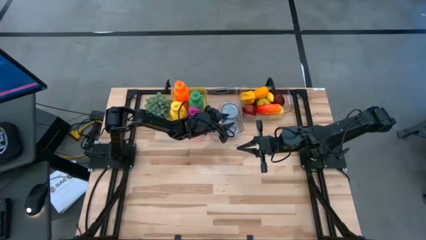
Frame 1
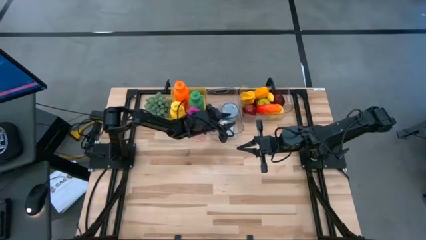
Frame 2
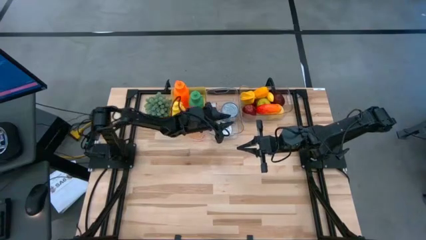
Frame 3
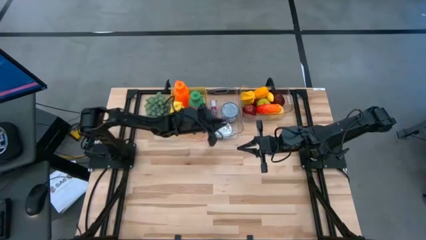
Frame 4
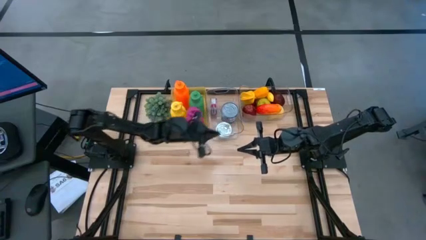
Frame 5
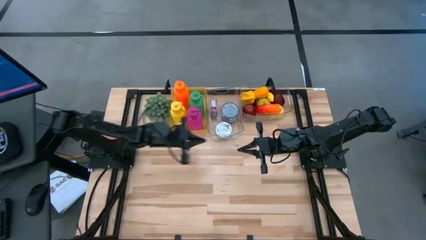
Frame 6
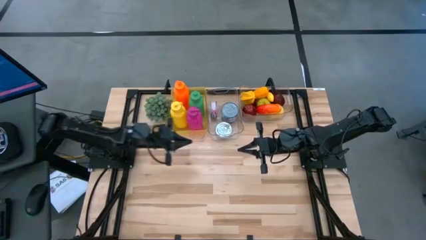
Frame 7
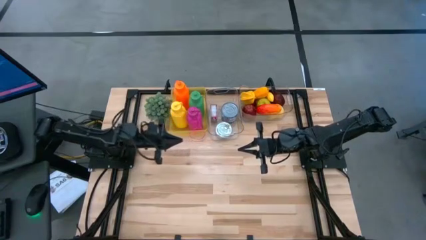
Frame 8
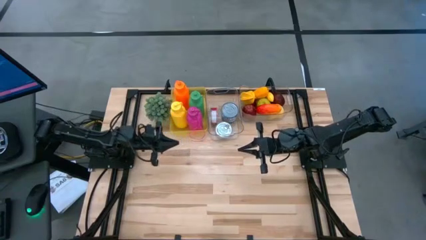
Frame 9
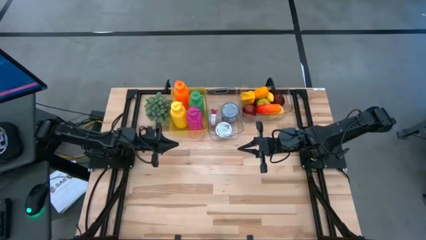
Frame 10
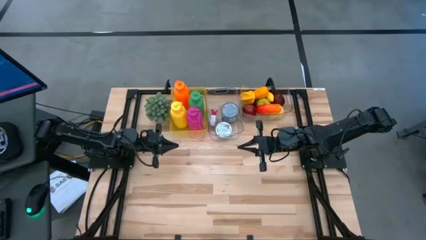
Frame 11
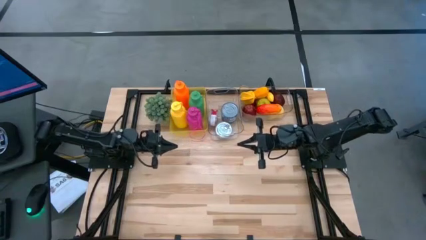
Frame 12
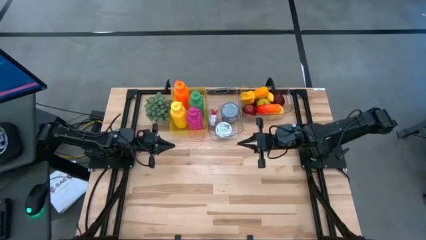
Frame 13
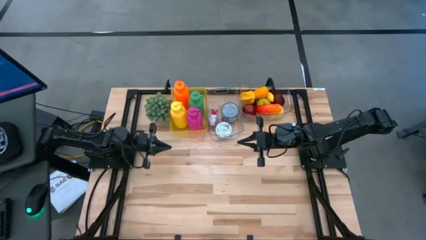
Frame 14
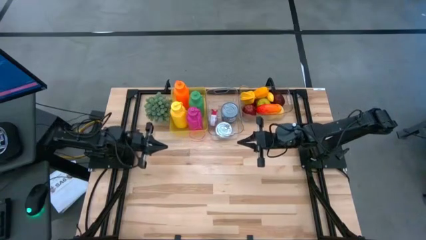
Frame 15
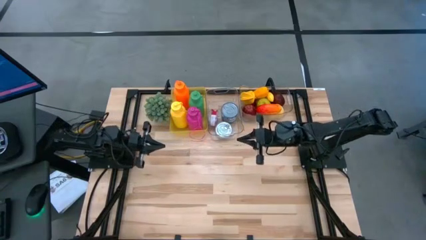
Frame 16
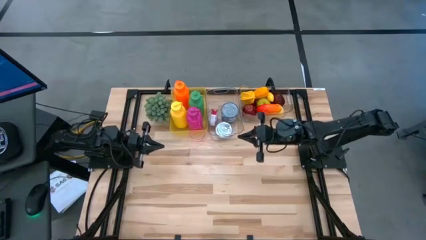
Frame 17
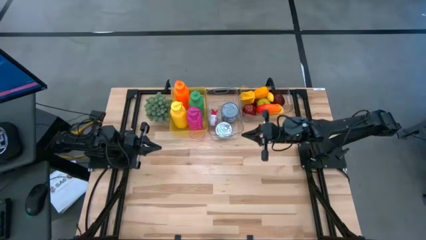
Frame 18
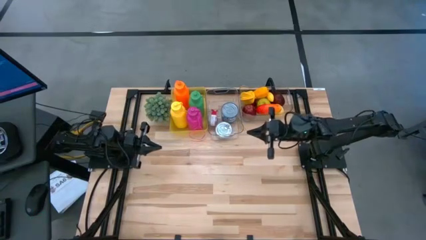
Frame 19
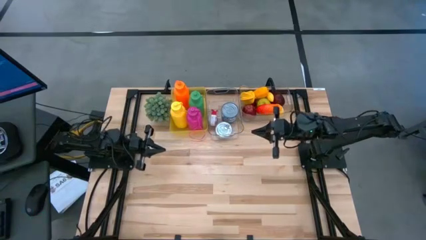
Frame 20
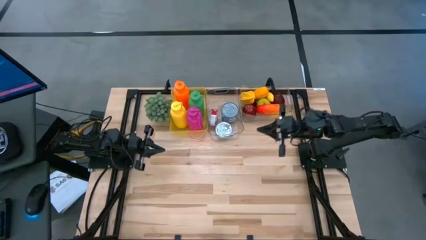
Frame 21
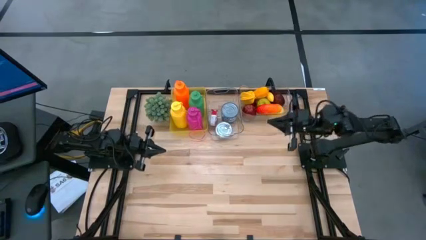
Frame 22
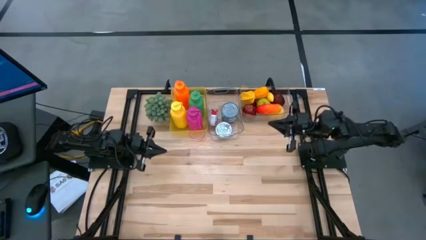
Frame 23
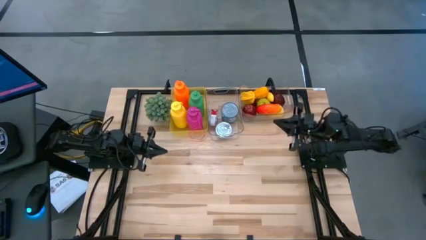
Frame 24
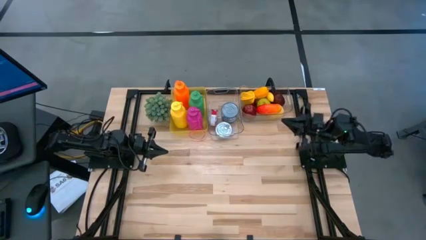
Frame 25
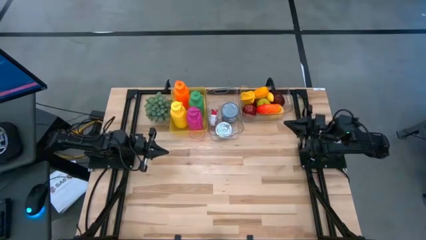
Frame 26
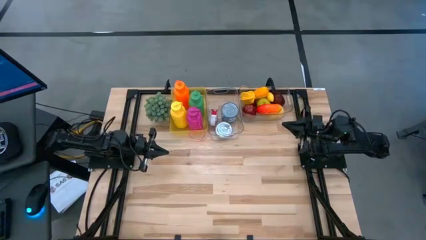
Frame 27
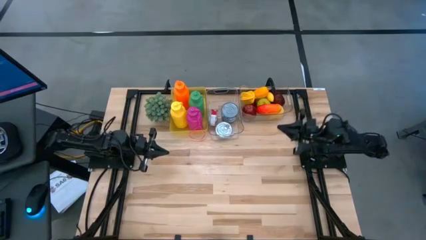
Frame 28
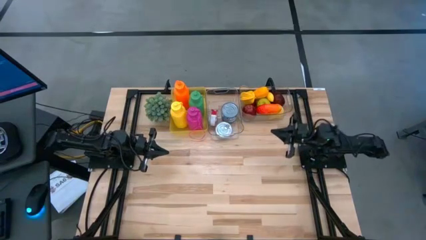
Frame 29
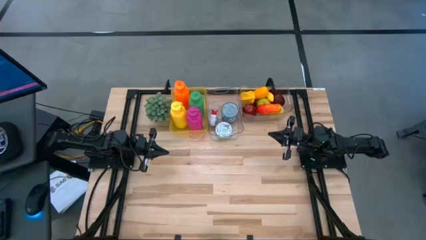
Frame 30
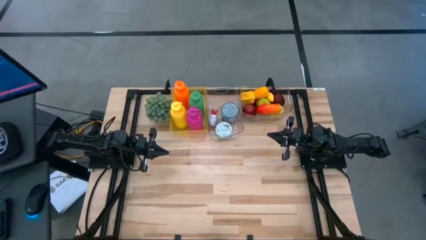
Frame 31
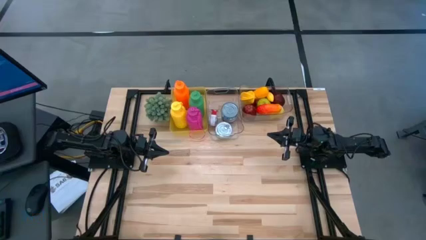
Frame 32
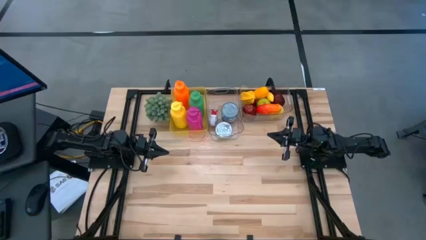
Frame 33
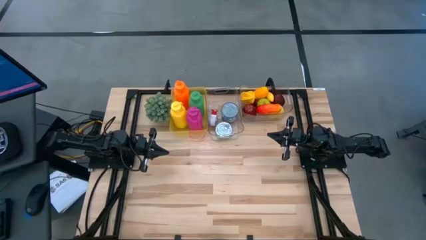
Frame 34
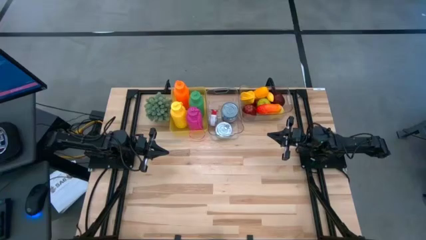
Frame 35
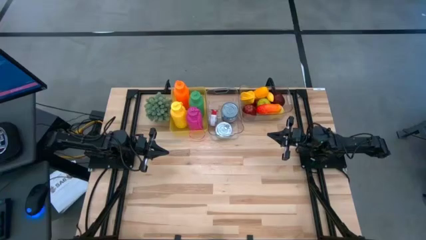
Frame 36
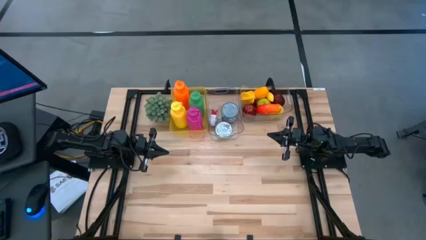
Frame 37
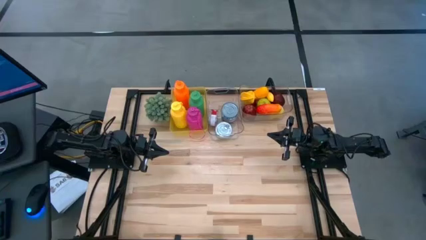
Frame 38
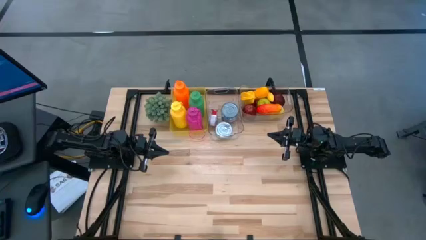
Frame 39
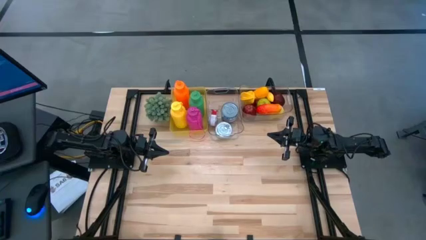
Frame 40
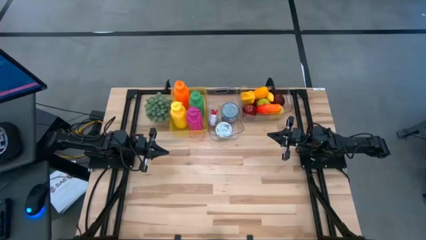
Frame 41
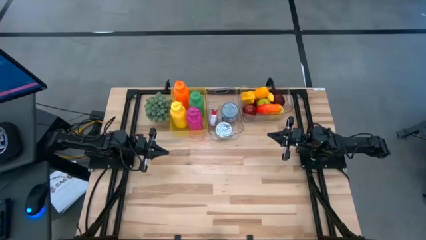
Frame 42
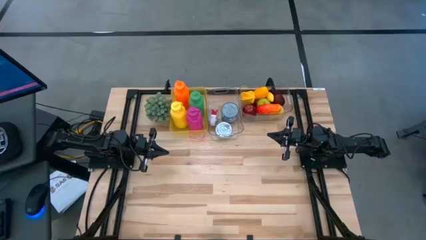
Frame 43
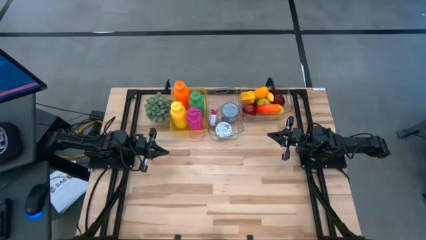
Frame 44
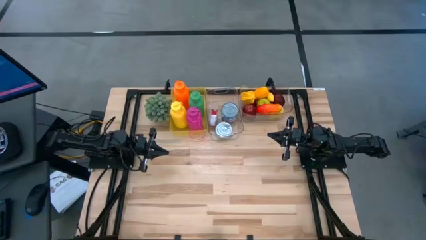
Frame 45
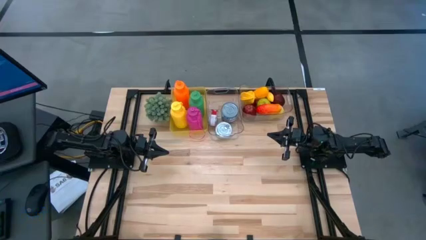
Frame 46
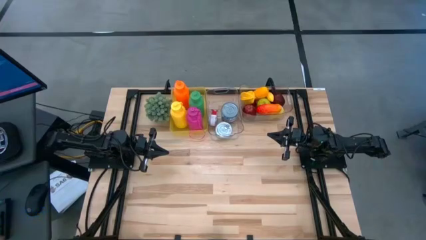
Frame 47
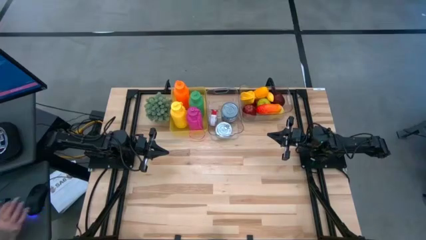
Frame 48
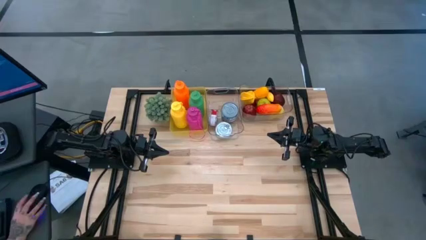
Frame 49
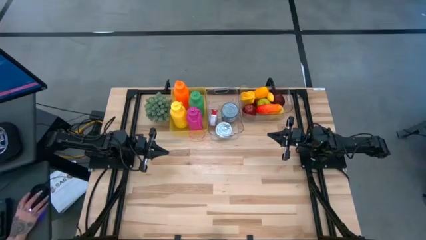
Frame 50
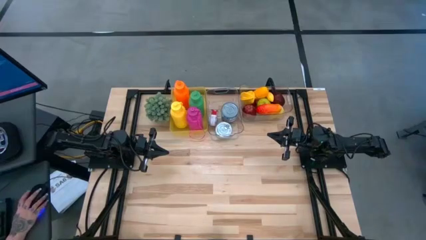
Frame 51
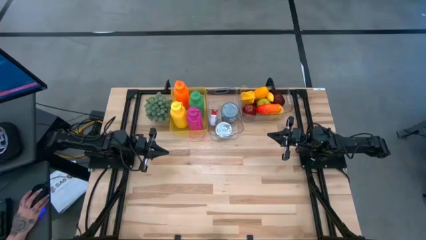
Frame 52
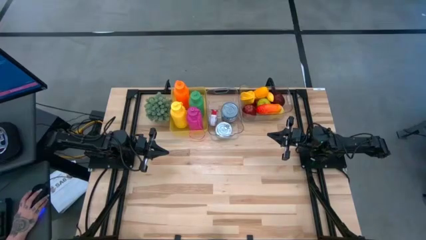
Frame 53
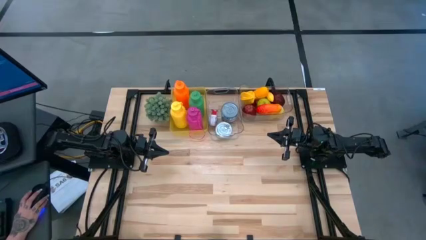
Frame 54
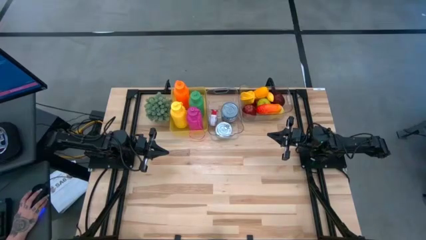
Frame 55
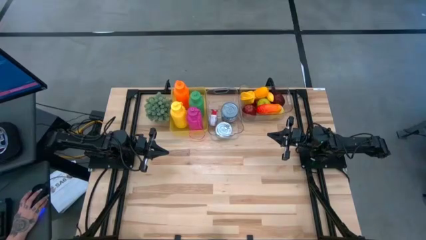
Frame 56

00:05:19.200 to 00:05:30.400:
Task: Pick & Place Food Item
Return to Home Position
